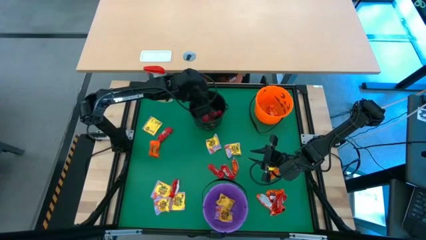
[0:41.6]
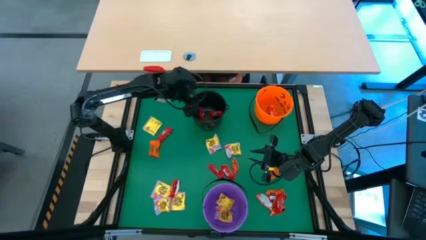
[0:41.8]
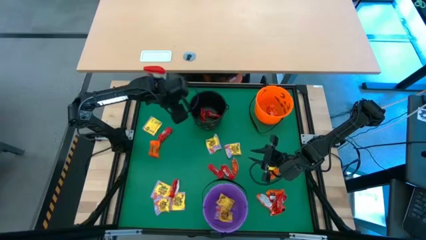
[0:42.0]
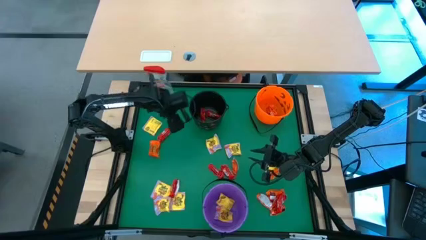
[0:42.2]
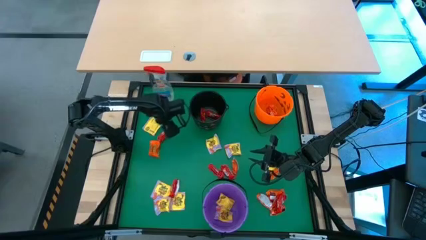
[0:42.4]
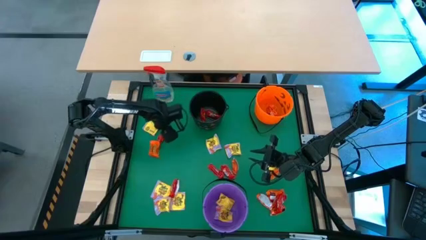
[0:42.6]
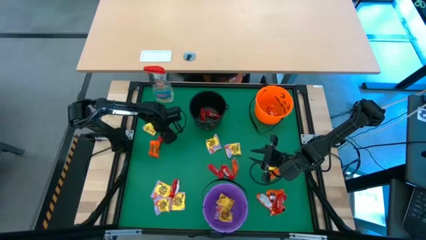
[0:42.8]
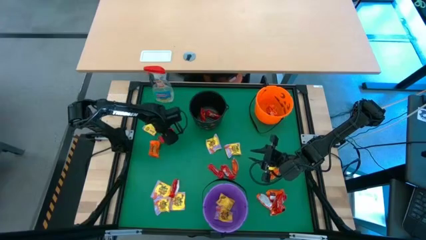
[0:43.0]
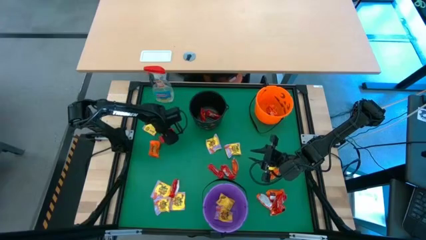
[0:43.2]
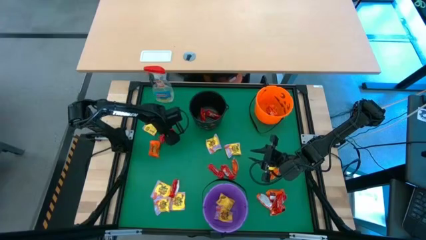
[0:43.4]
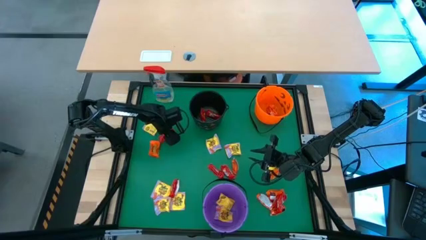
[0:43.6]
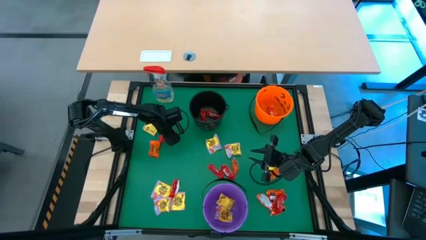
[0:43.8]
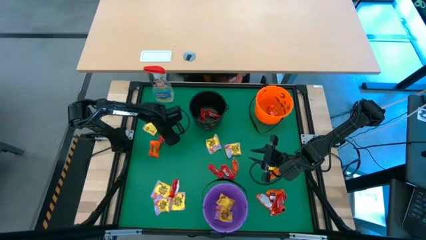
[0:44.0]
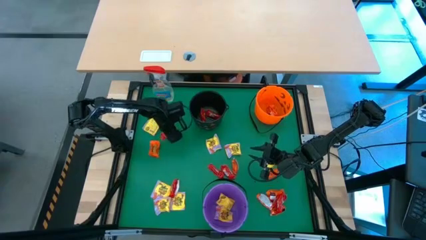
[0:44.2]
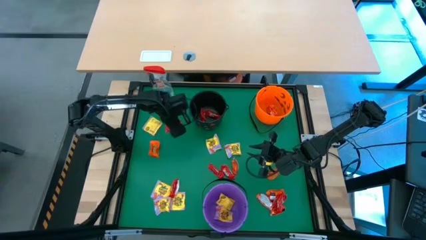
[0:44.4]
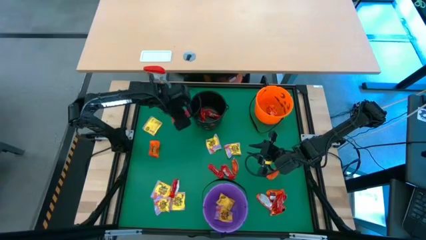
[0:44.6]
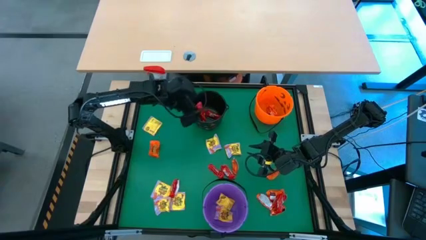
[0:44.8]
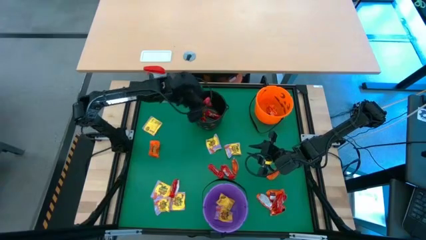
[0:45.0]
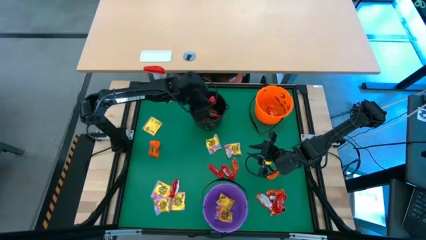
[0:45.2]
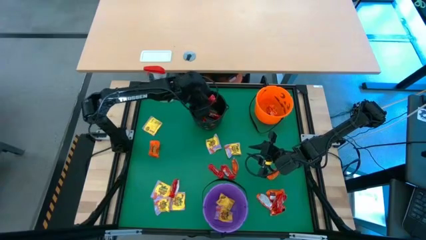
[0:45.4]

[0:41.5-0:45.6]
Task: Sort candy
Put the red chocolate into the black bucket

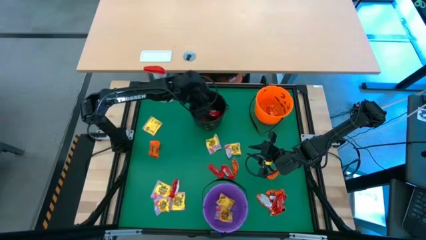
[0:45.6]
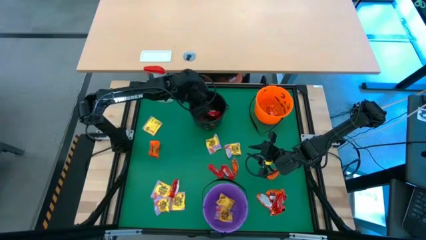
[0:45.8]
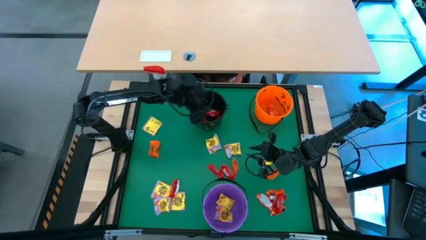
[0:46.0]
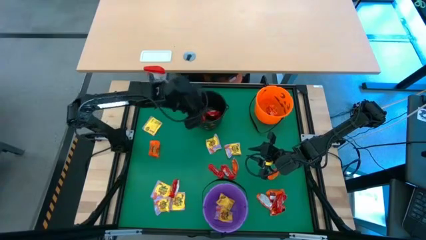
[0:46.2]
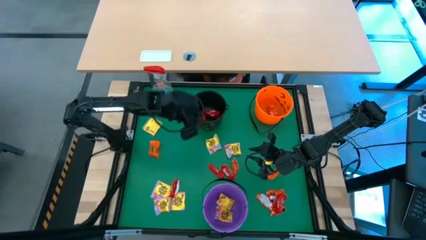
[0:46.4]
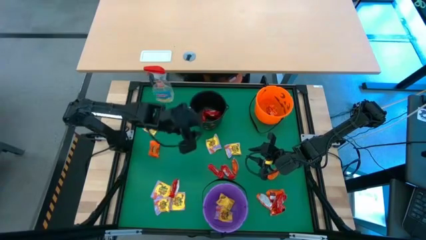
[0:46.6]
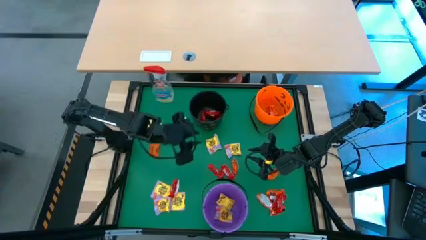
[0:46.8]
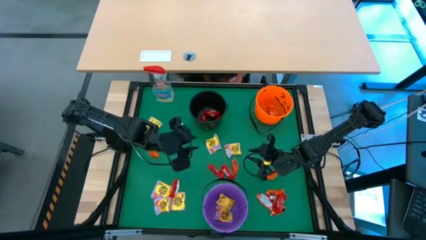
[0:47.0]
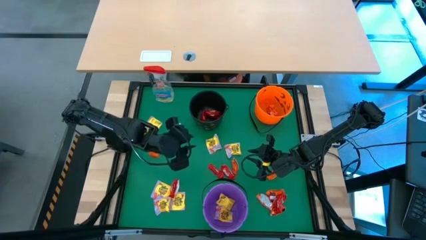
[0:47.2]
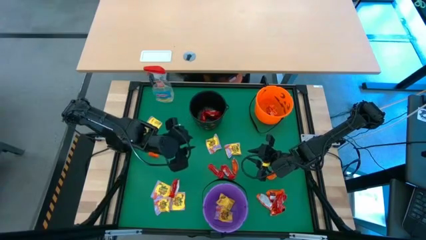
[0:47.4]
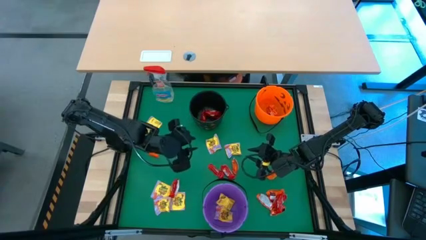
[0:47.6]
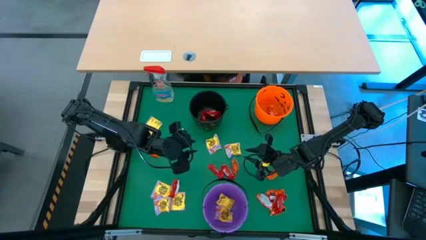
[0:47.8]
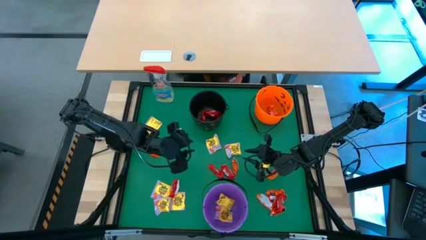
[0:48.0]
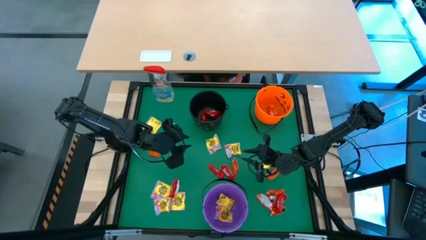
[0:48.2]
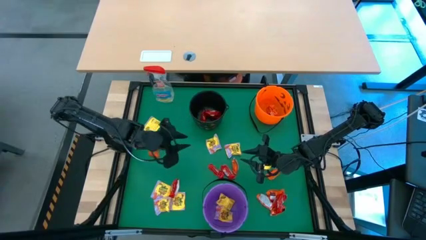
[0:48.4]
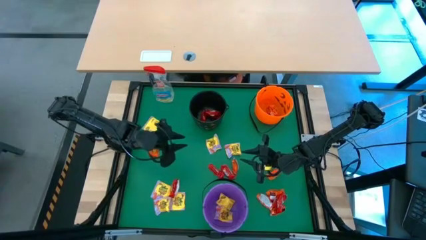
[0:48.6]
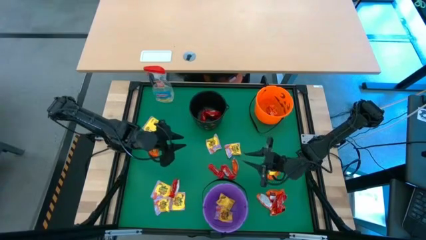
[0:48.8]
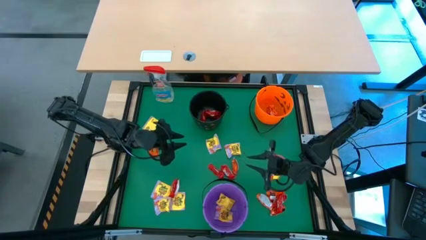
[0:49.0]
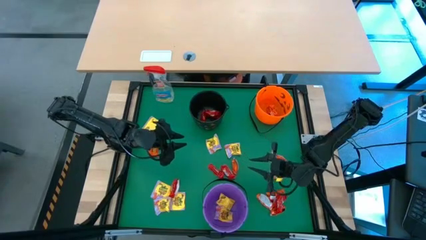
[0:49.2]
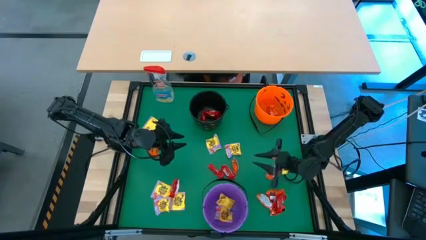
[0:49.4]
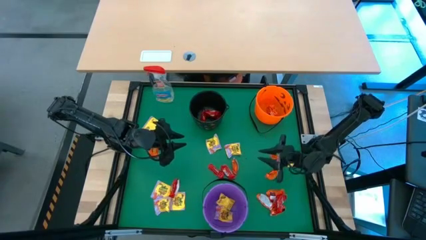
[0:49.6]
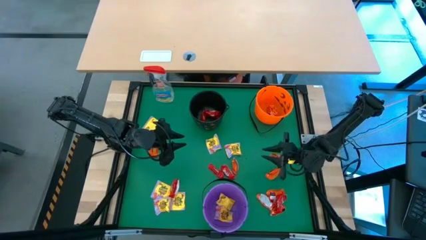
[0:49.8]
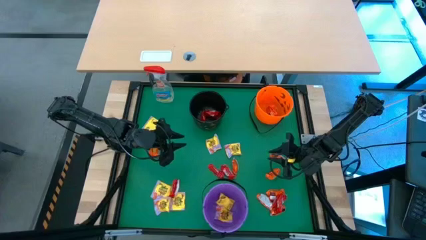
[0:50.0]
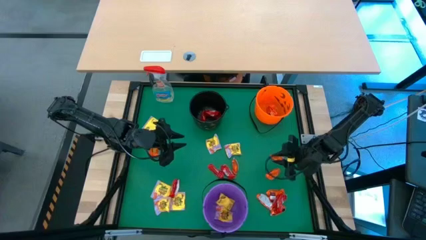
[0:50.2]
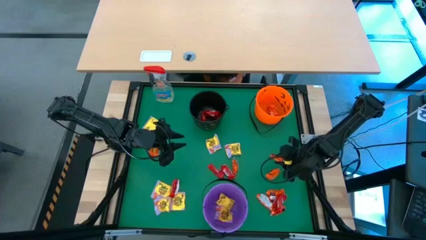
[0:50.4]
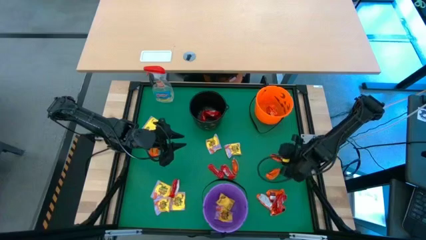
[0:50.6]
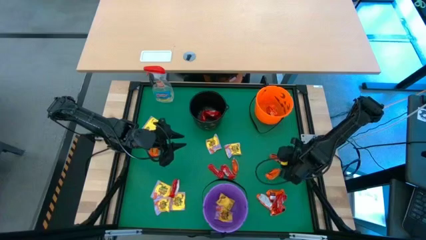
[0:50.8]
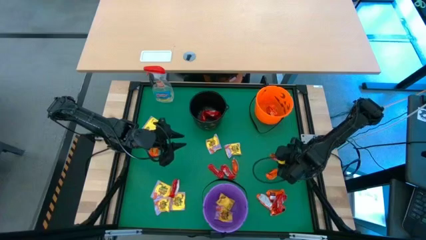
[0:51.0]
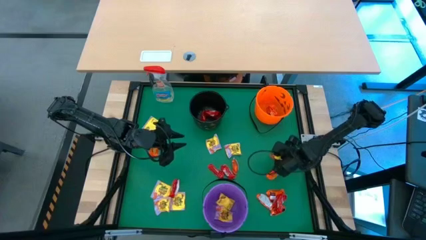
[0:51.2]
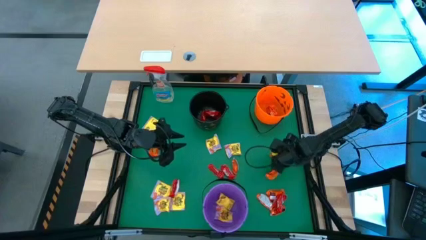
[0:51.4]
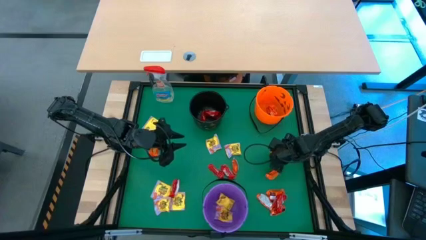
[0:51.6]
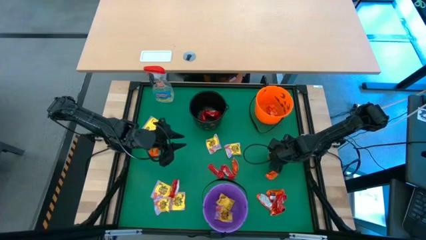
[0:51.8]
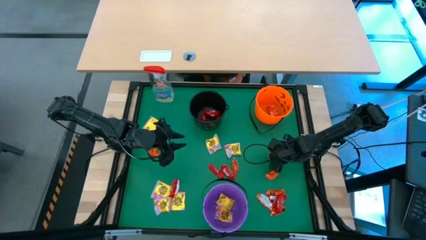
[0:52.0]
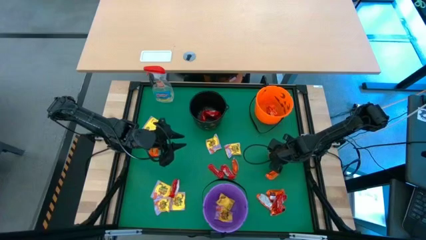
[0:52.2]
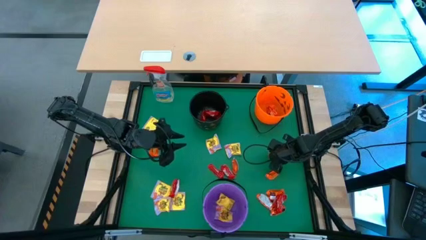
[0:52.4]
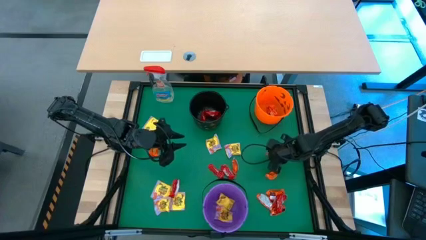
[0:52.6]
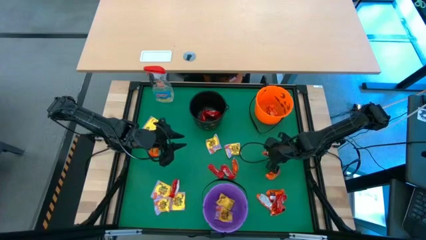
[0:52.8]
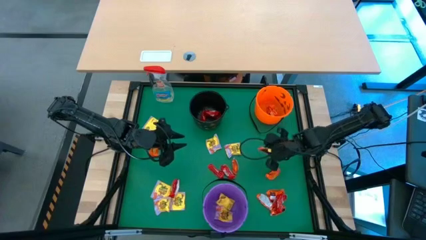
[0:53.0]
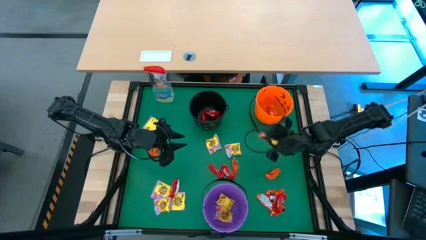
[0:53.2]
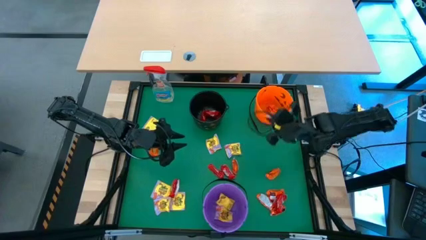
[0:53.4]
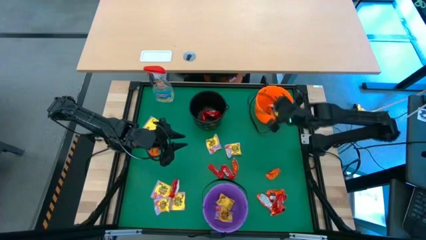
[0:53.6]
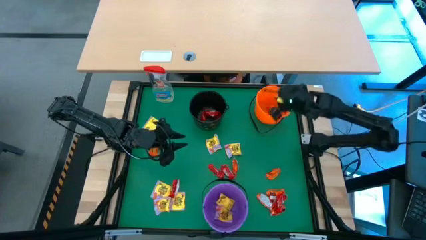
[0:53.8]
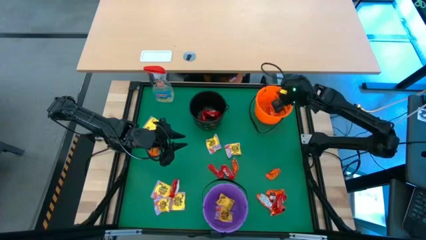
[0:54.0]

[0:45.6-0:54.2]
Put the orange chocolate into the orange bucket

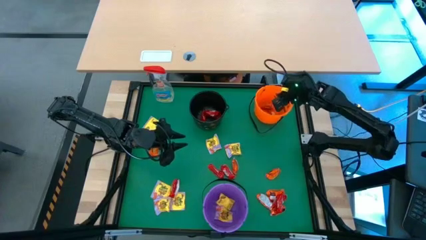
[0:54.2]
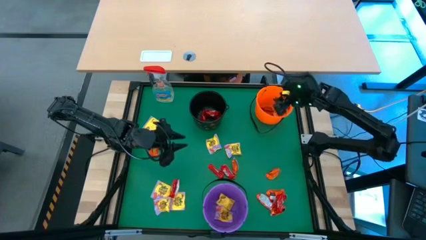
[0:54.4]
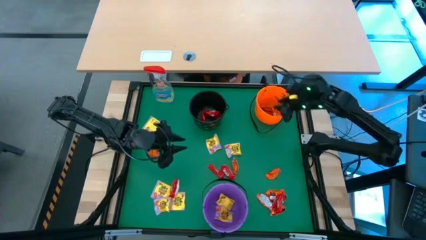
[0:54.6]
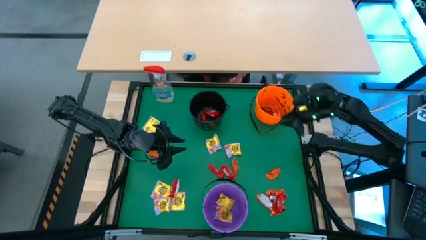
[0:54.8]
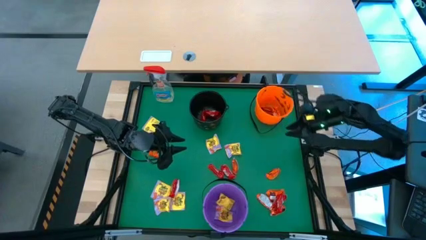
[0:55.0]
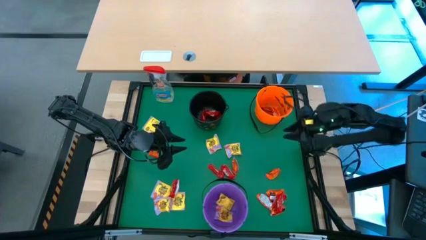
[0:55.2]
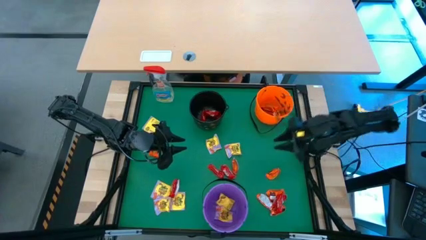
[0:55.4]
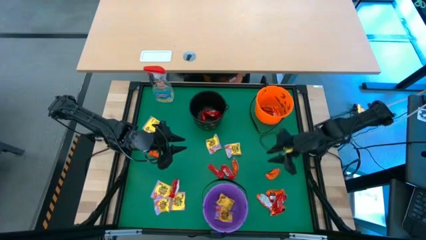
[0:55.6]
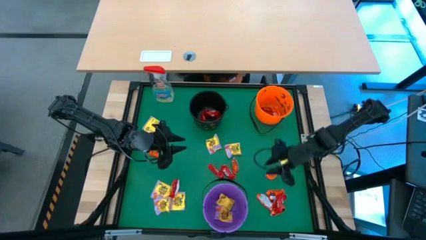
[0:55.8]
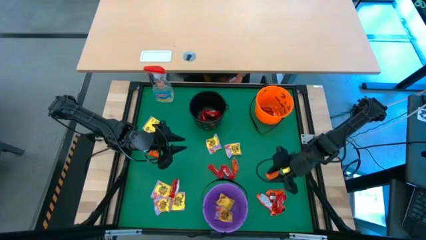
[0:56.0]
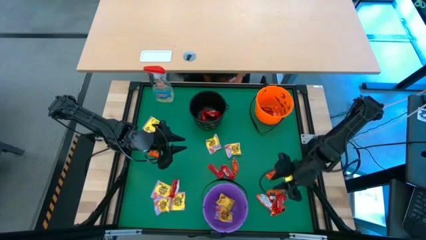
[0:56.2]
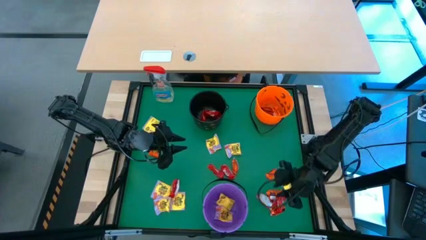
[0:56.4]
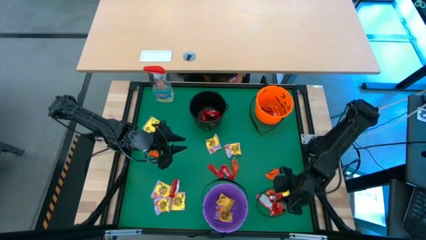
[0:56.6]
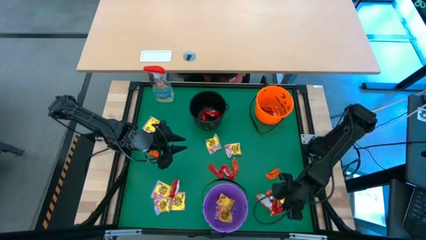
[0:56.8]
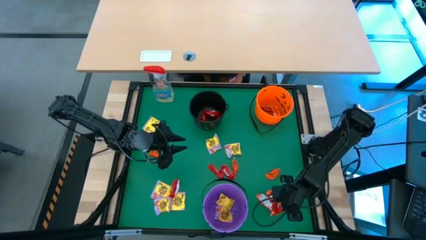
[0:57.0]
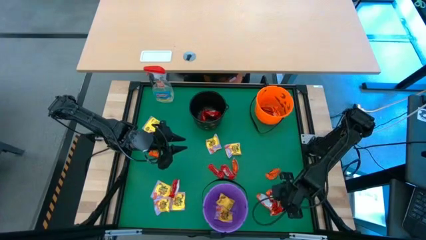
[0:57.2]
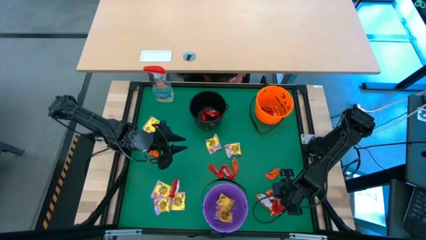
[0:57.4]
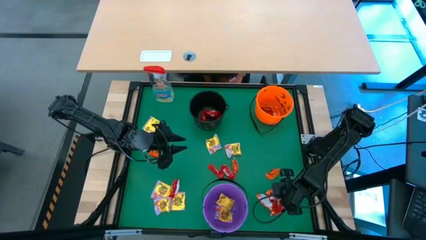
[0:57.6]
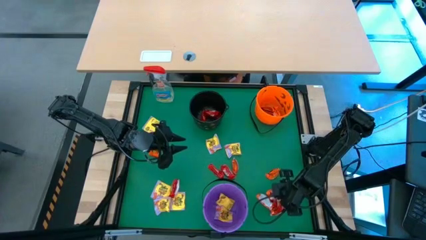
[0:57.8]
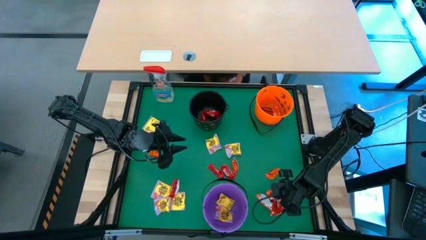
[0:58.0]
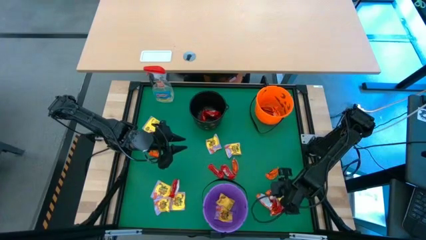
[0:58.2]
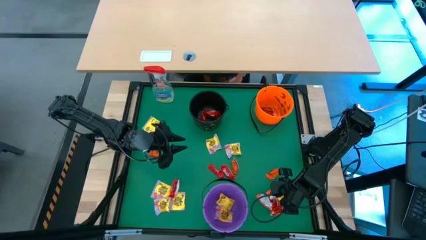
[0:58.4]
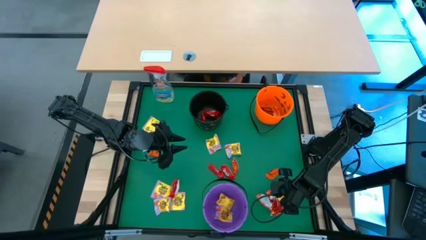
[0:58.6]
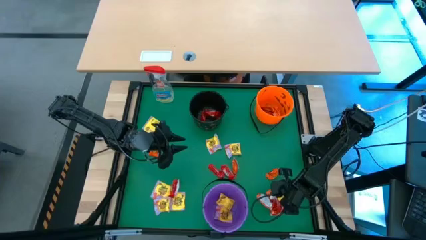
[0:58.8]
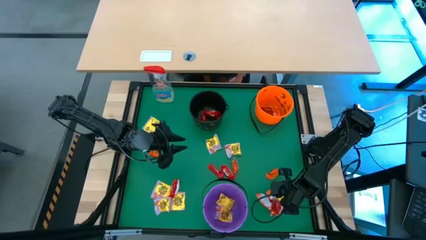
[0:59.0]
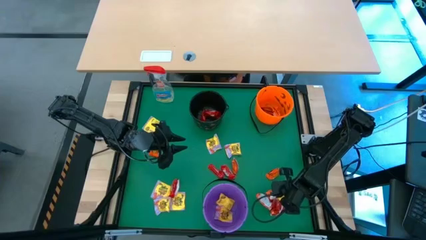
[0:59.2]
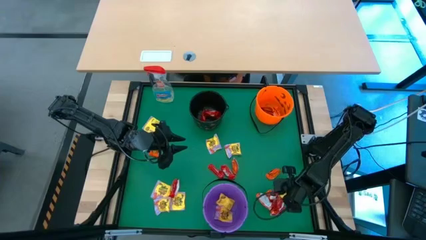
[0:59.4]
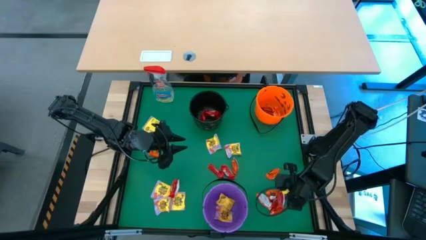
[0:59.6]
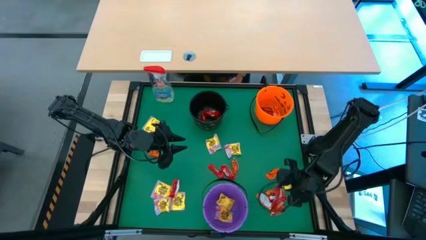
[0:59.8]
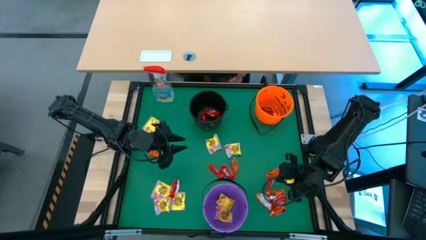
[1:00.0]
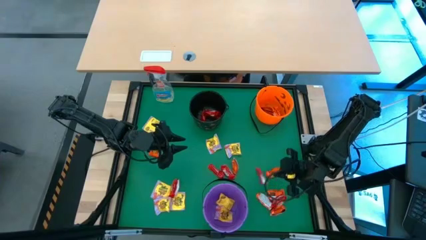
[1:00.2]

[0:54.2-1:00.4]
Put the red chocolate into the black bucket
